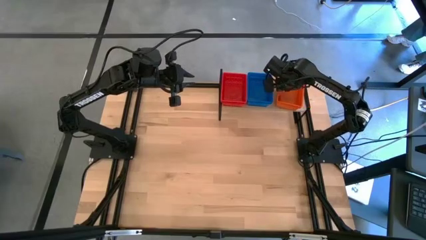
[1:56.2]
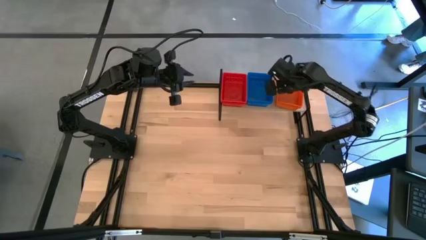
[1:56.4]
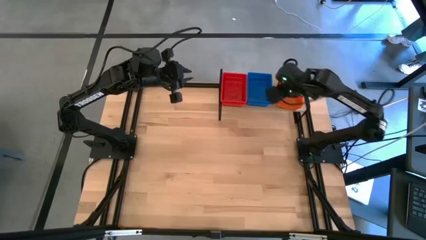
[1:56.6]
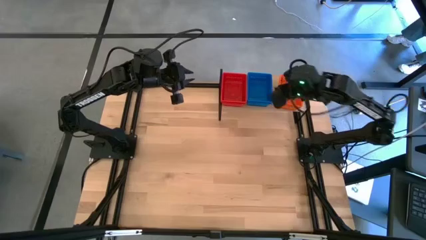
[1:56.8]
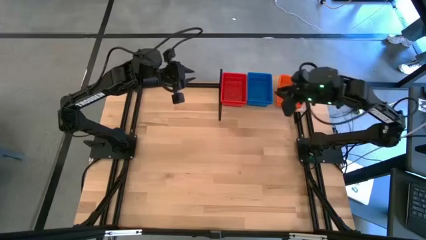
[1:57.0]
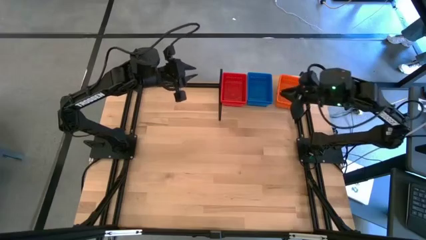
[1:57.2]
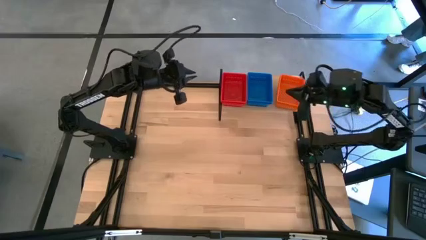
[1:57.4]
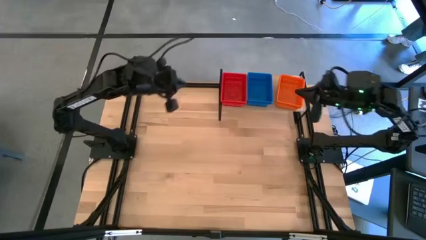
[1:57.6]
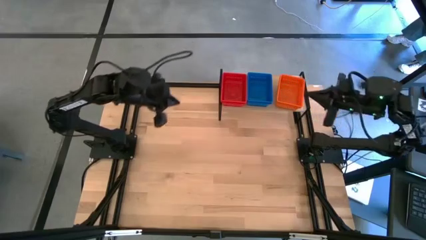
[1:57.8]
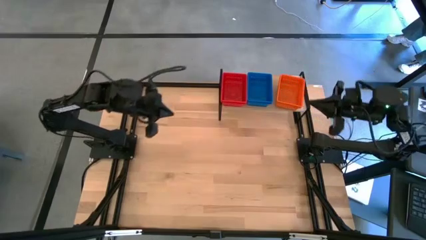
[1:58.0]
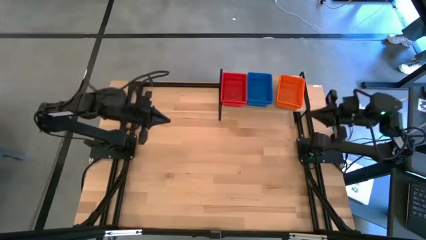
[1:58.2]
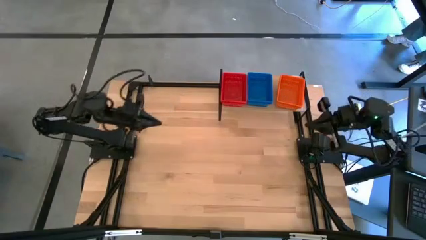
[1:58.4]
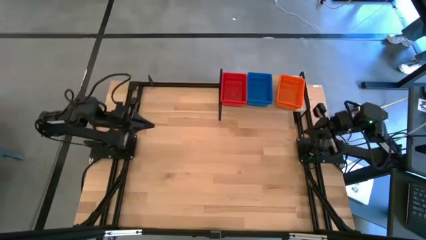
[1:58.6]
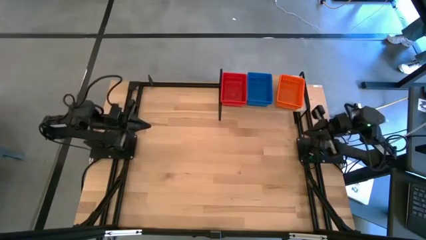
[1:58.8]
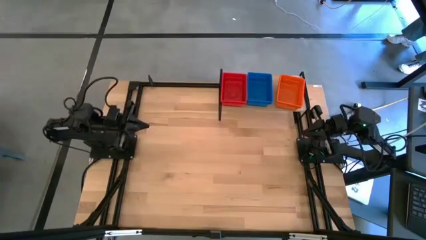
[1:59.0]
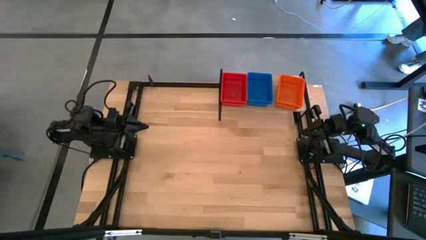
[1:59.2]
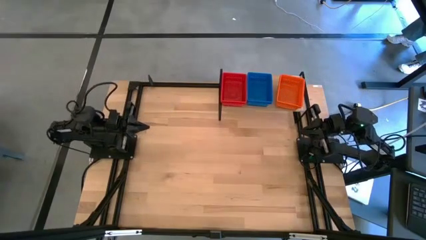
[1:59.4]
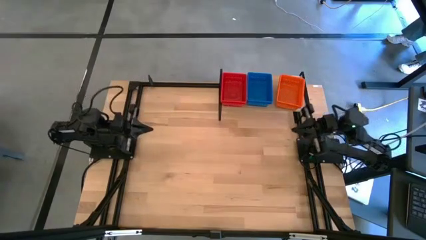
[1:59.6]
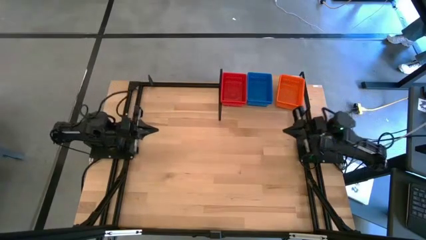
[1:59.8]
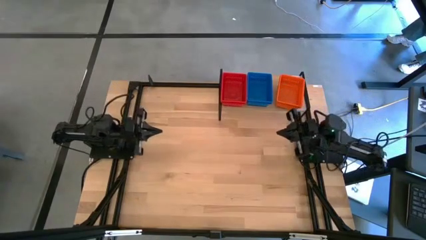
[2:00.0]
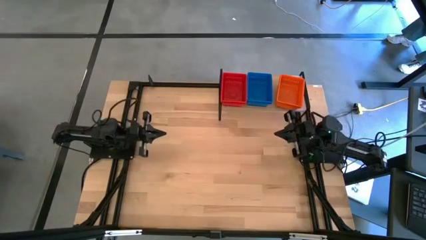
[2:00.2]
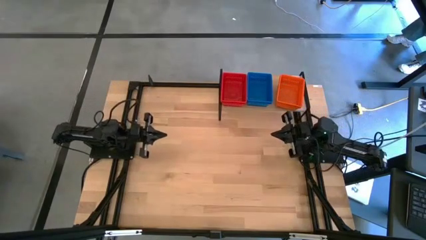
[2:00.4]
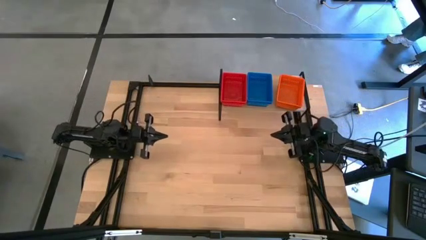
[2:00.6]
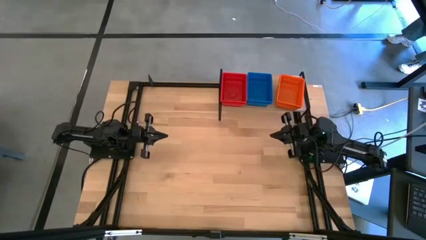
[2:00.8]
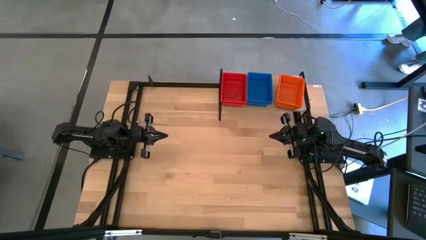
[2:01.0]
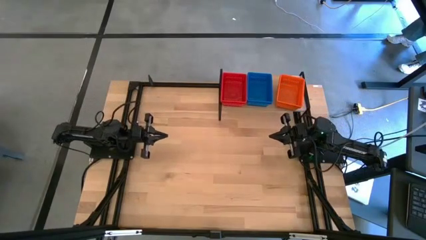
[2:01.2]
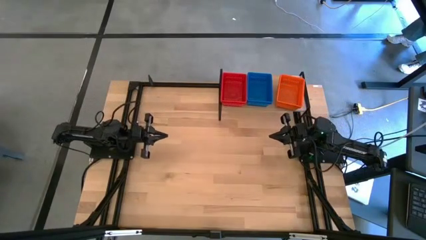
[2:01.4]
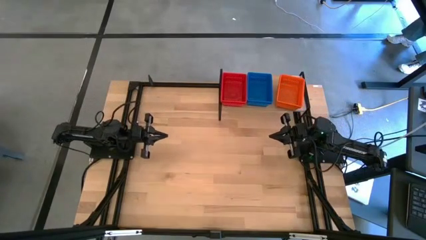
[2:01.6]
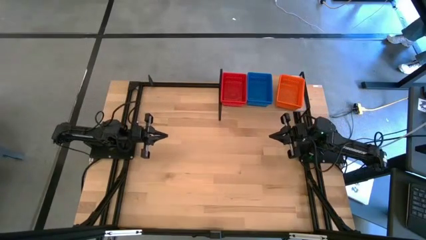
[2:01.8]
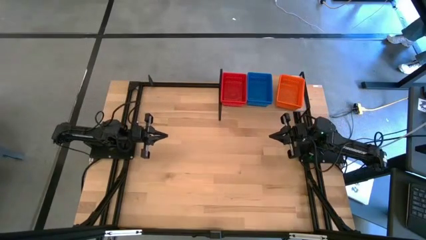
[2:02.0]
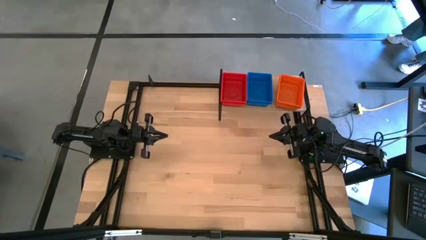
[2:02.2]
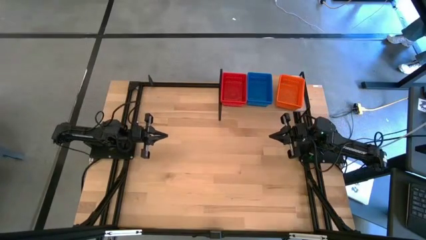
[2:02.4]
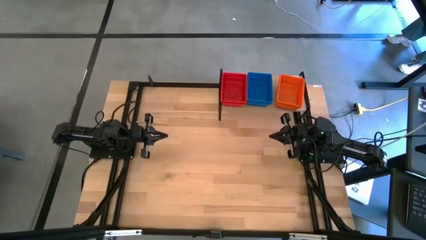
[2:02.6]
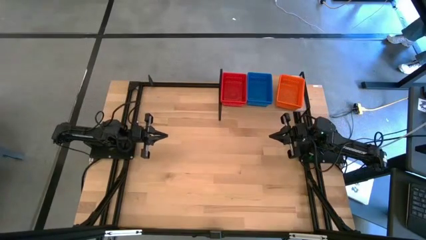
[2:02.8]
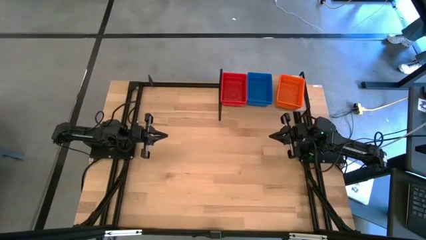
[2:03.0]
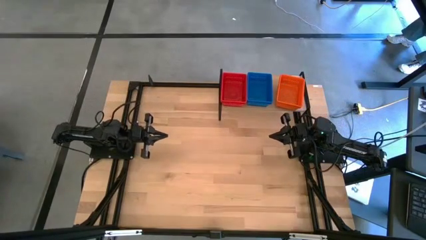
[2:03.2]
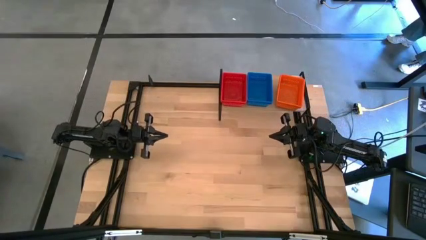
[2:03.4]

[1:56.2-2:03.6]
Task: Stack baskets on shelf by color
Return to Home Position

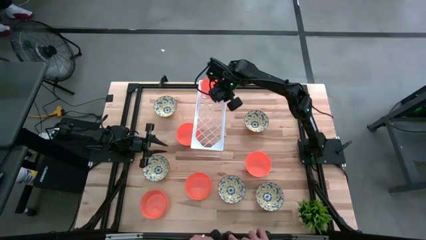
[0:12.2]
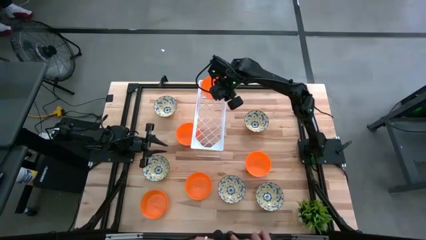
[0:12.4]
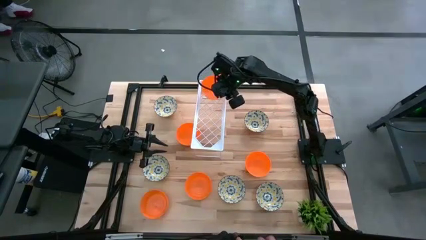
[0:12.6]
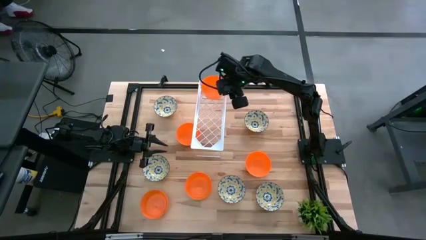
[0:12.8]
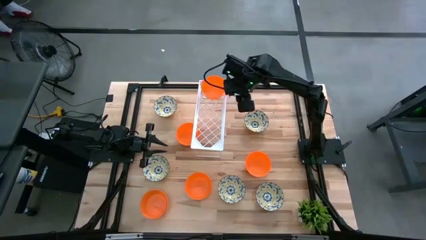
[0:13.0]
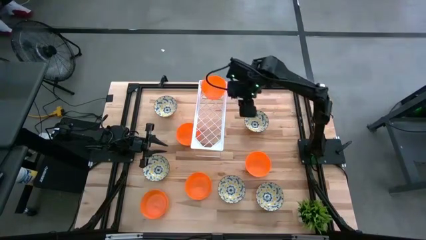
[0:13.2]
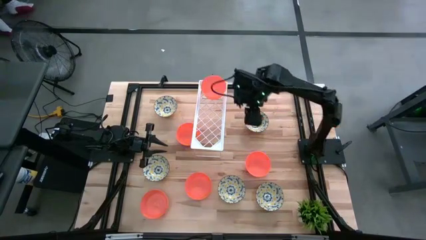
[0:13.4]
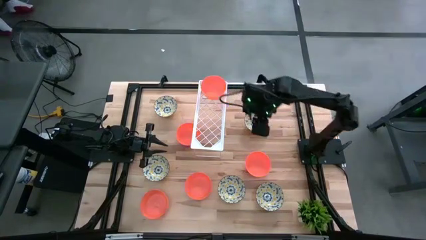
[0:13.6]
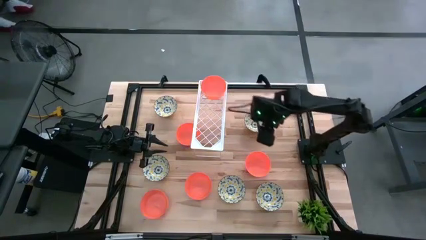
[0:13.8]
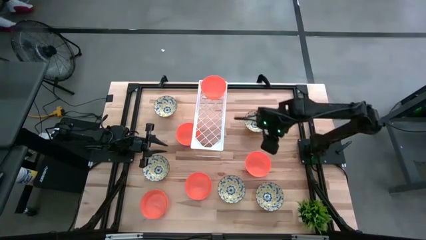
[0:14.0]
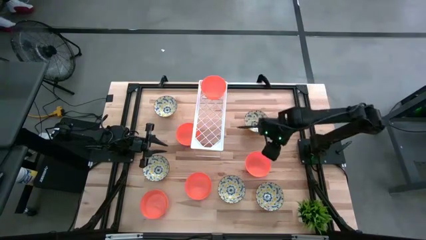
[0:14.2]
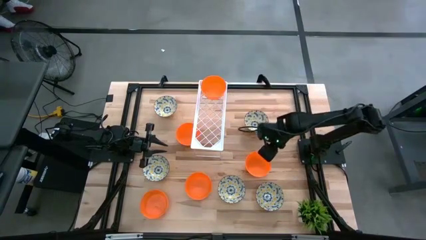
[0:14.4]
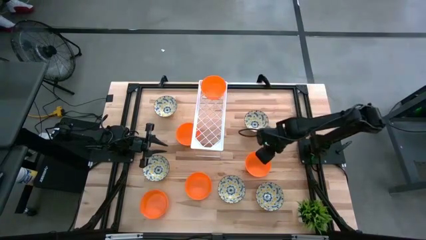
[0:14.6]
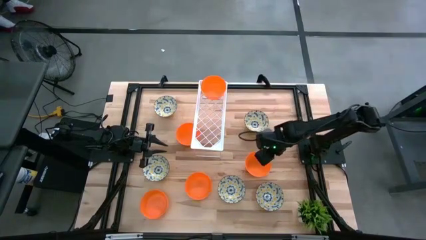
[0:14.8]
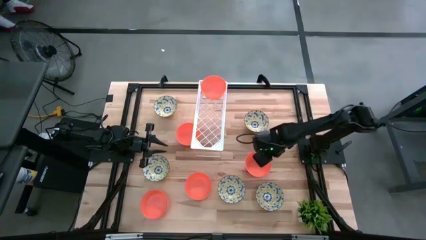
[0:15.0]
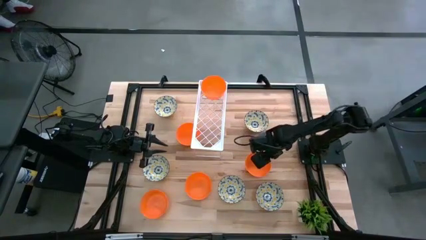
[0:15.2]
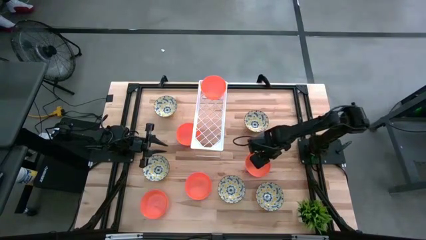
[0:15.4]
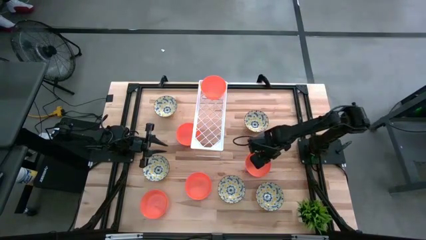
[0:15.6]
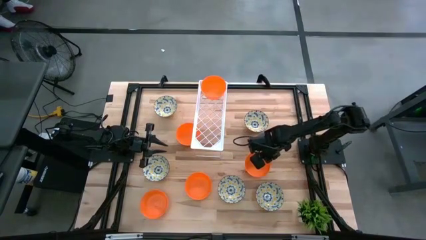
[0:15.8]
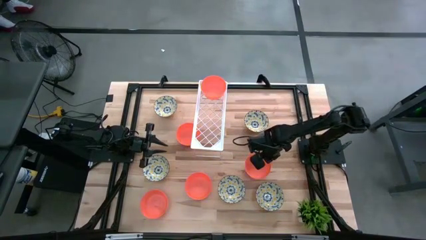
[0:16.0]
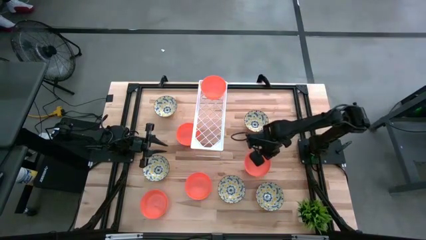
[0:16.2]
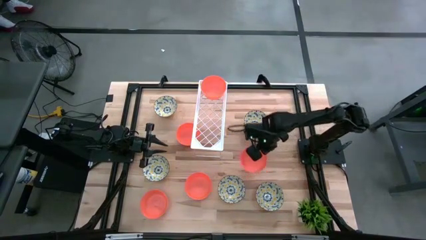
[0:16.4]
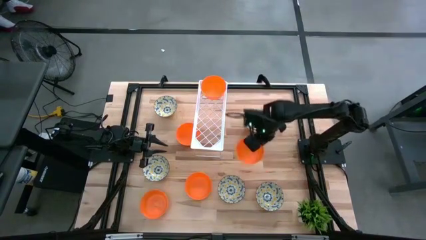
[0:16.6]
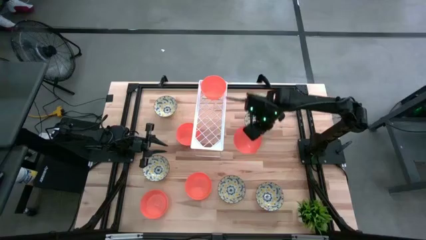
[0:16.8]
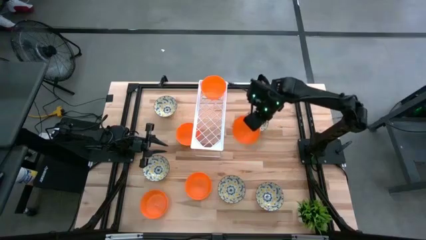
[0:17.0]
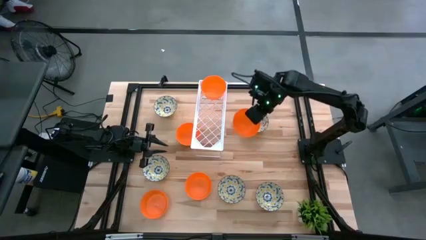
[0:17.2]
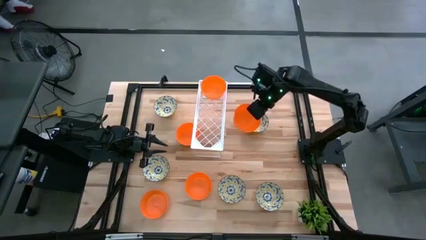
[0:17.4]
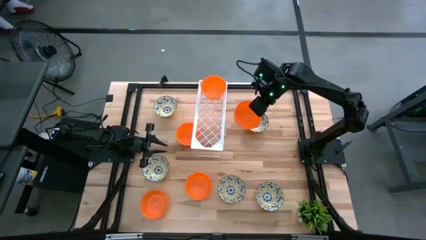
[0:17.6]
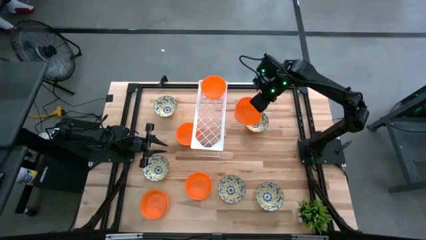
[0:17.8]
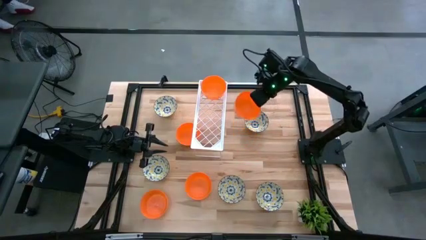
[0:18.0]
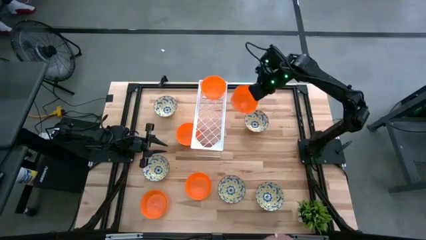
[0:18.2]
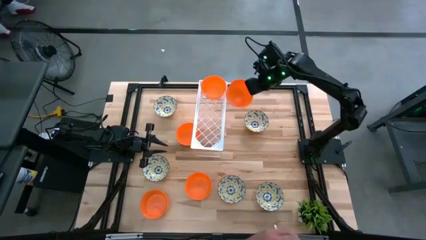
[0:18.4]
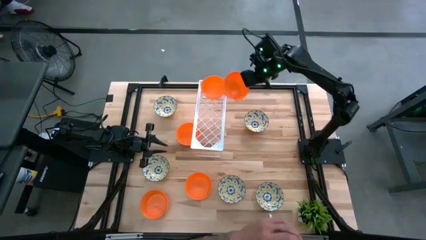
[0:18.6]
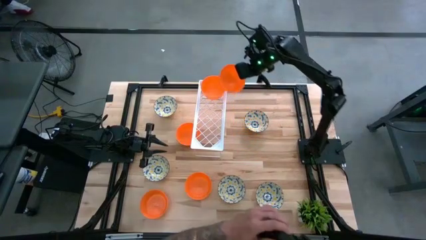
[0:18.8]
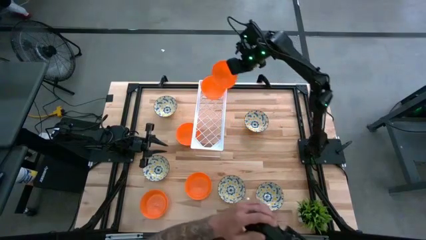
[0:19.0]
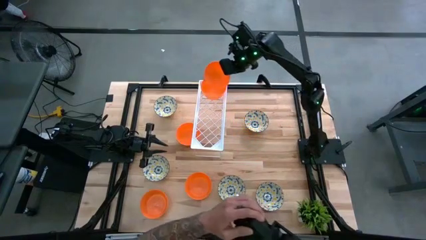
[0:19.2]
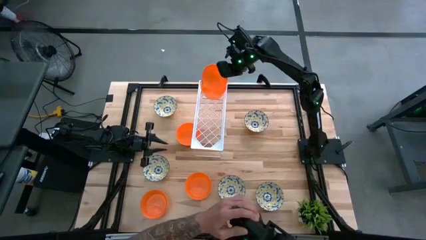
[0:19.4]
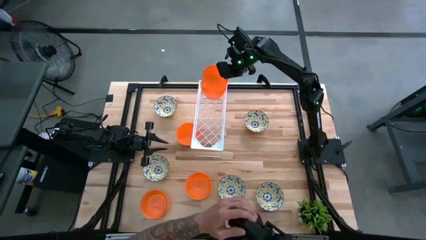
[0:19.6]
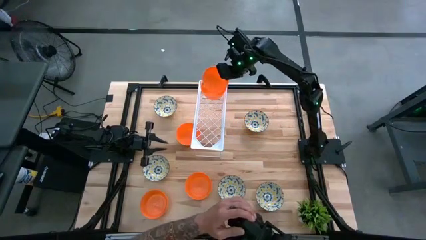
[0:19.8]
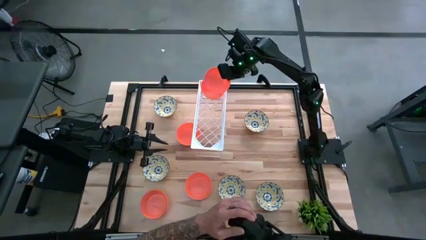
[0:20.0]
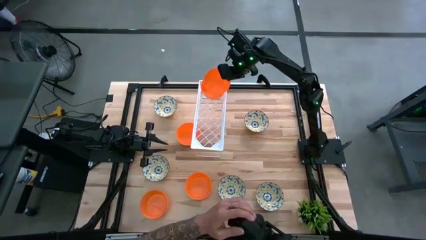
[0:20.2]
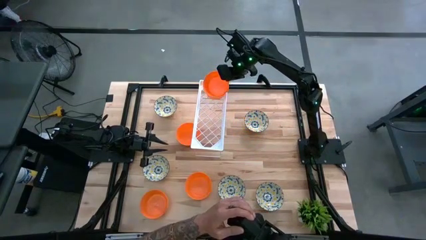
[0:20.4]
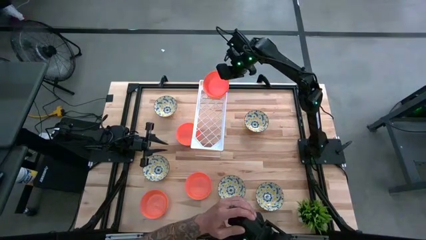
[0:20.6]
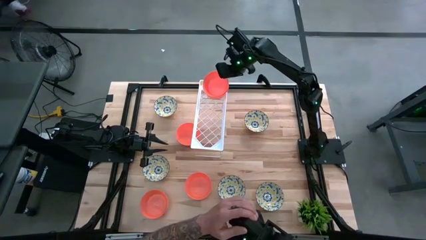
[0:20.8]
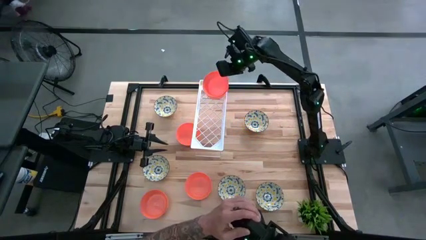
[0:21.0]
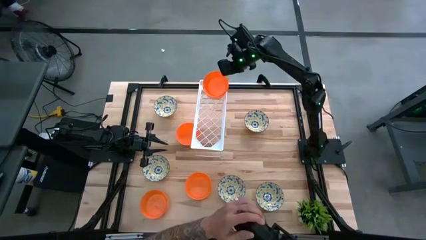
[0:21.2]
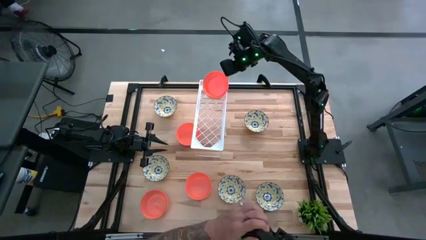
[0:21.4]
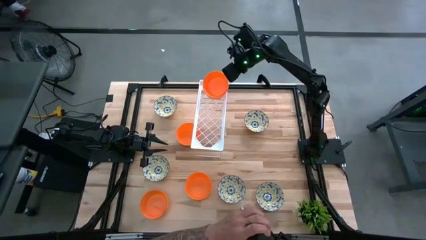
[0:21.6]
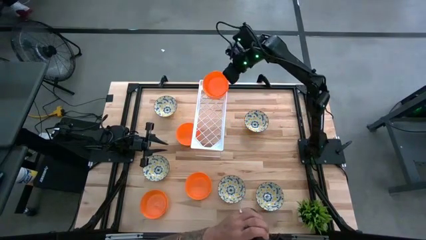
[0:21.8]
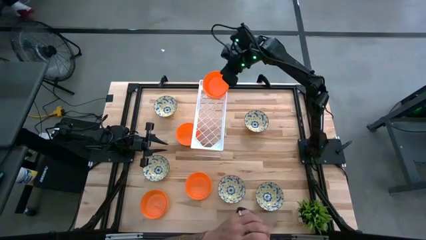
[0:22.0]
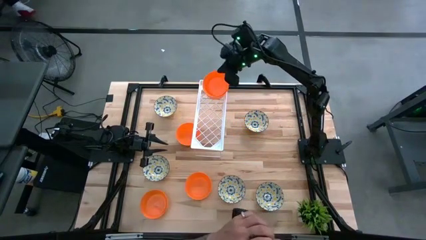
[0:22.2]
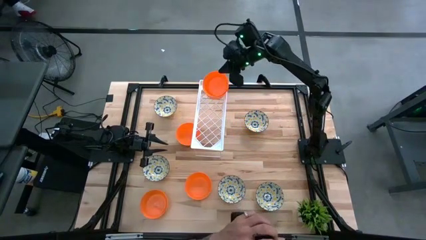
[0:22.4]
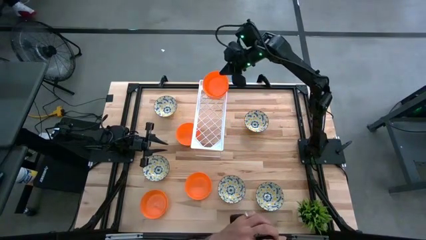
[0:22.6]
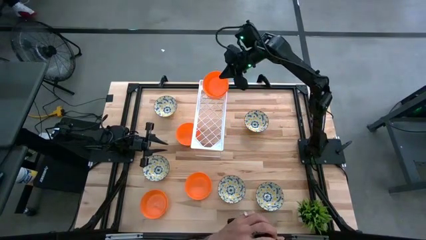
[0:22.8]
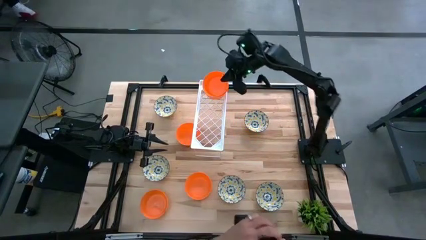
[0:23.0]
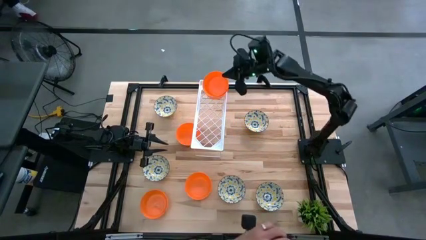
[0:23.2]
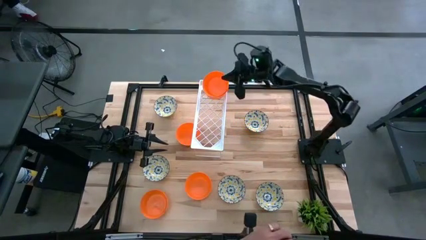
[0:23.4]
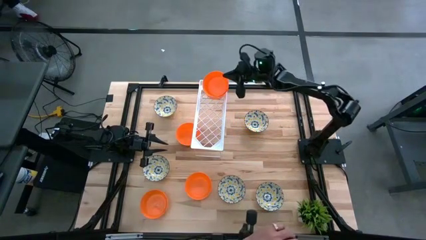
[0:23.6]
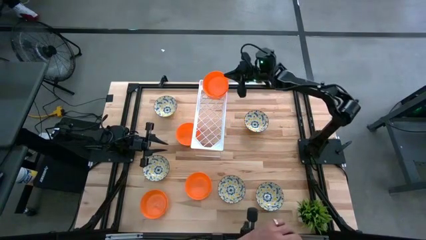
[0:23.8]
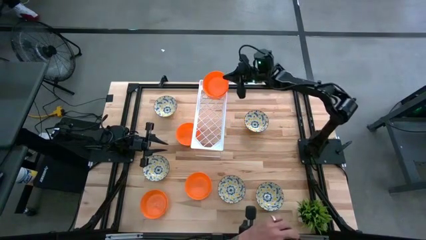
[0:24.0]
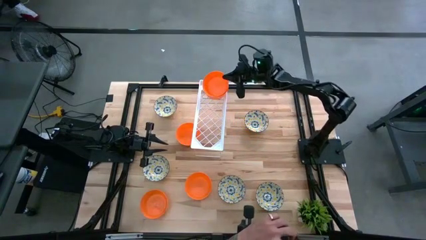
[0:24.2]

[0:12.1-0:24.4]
Task: Pick & Place Mini bowls
Stack the orange bowl on the orange bowl on the shelf
